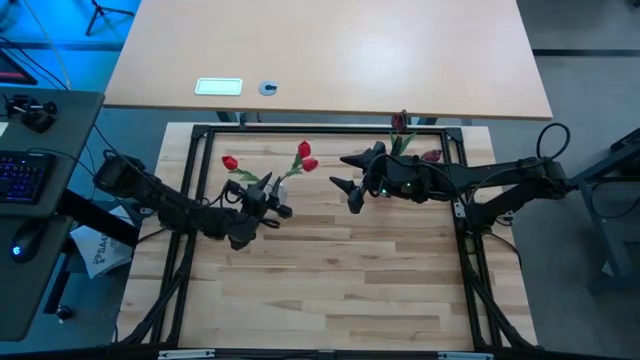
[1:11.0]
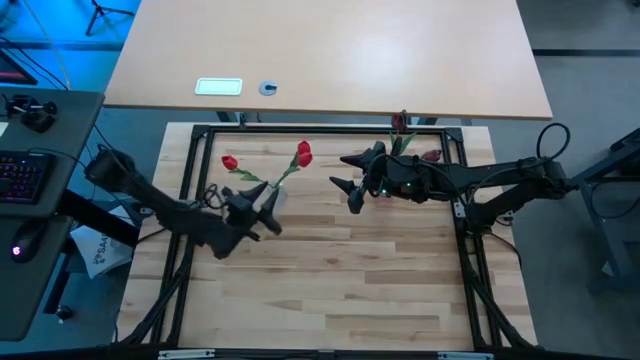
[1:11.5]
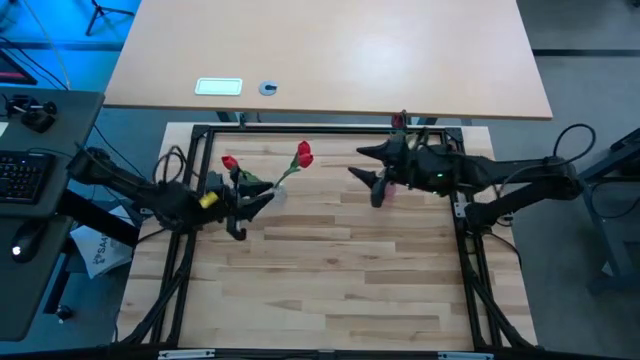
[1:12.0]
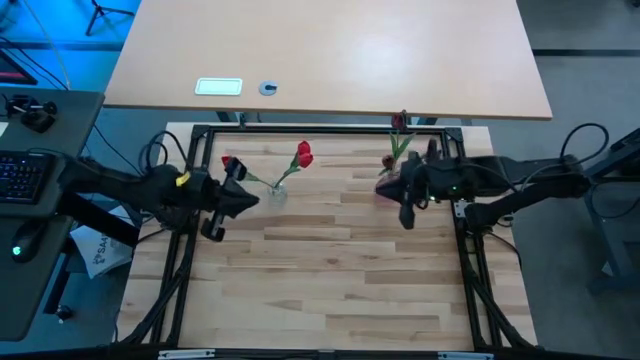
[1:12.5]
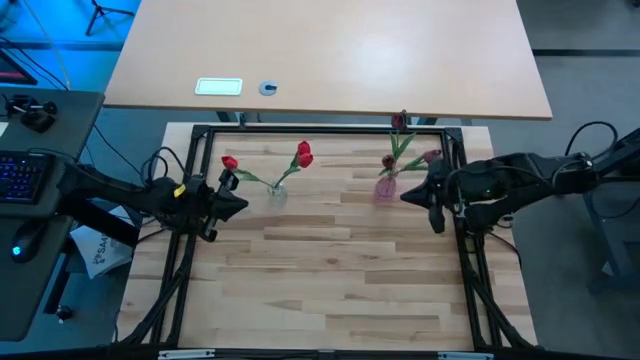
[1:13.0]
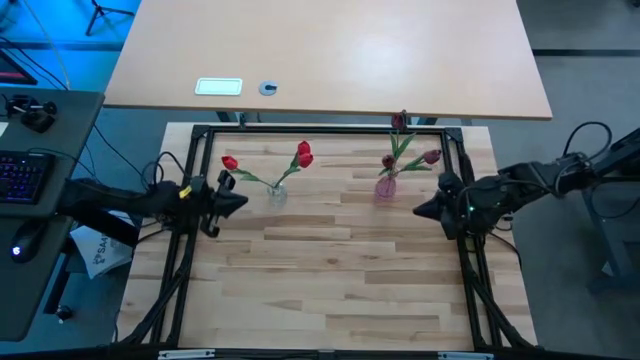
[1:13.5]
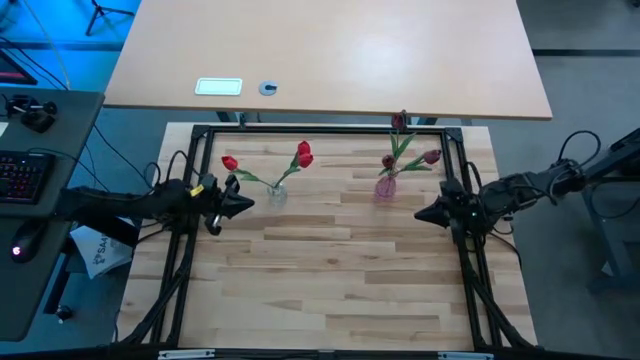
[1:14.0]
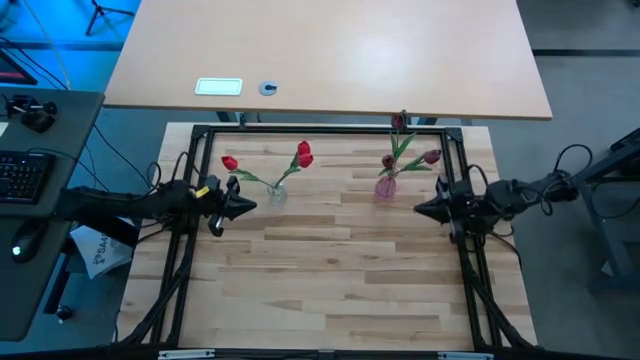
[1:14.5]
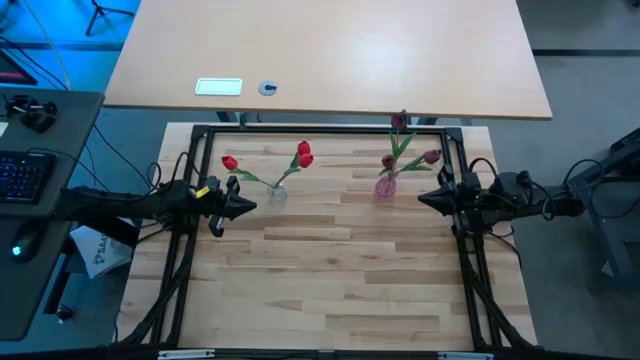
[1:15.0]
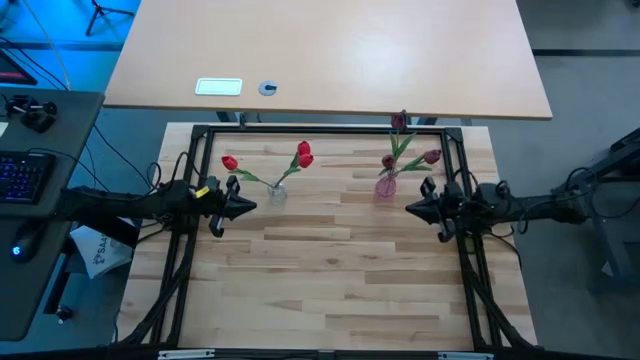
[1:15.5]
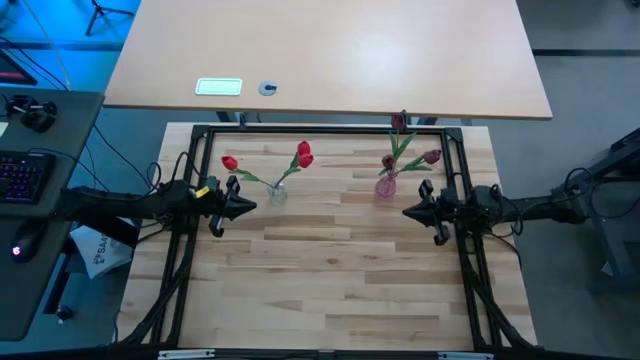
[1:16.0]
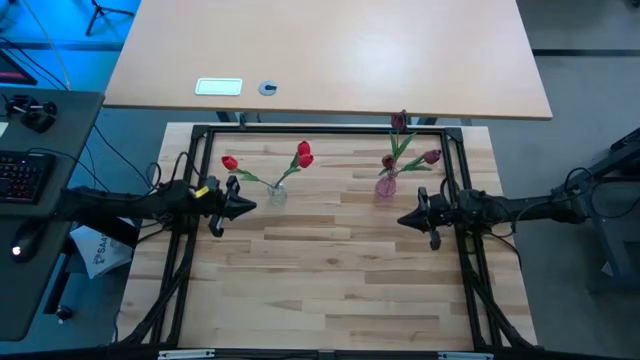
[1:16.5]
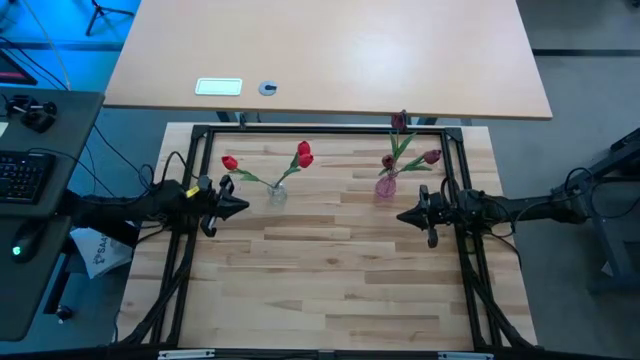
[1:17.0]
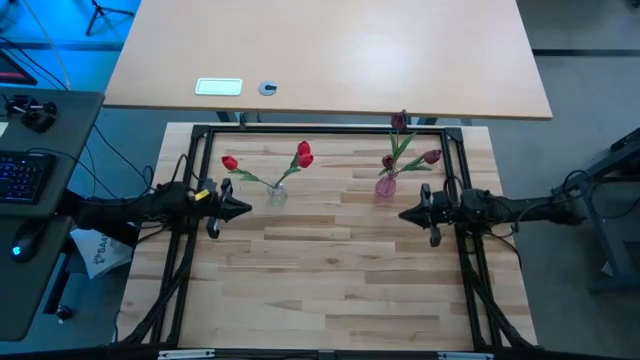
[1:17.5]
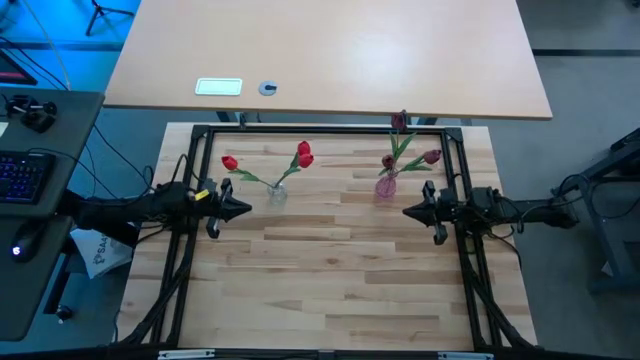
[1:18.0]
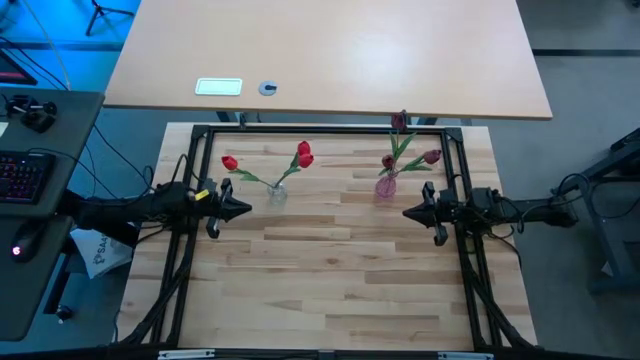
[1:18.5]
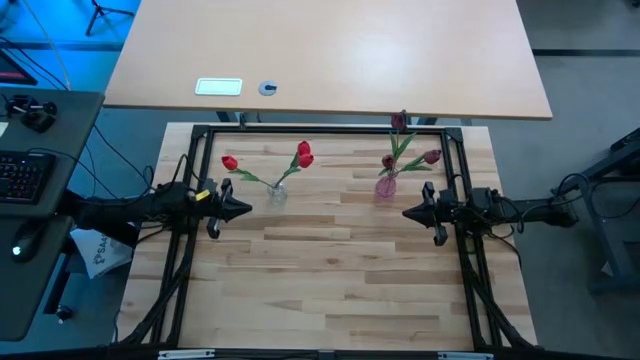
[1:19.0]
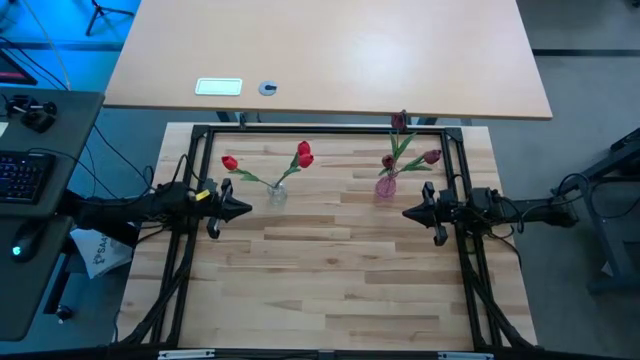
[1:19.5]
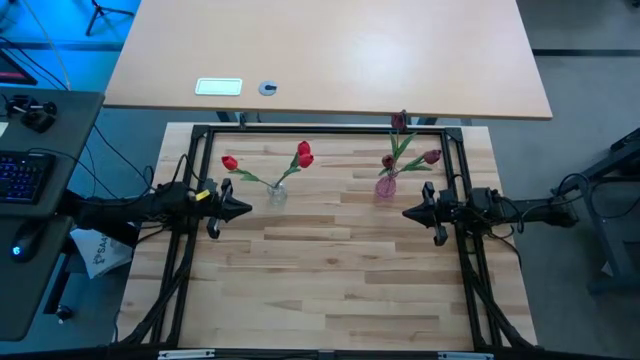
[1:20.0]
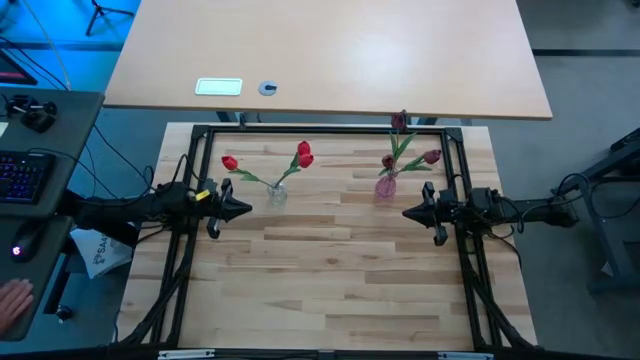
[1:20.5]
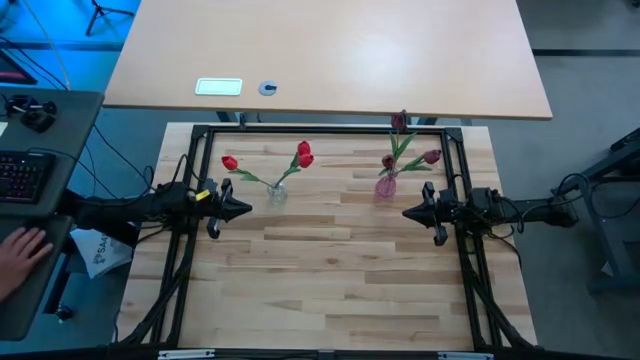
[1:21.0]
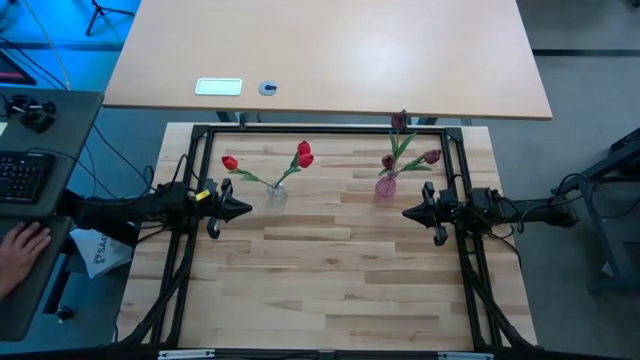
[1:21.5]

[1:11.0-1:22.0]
Task: Sort flowers into vase by color
Return to Home Position

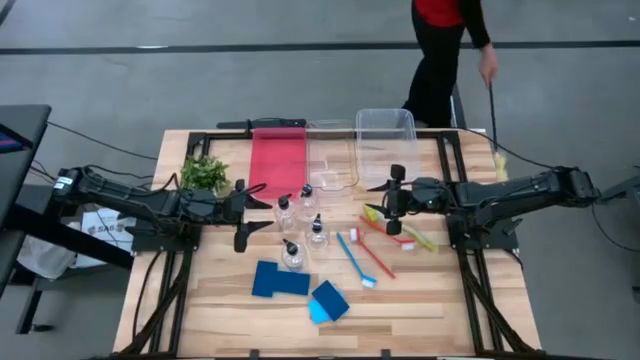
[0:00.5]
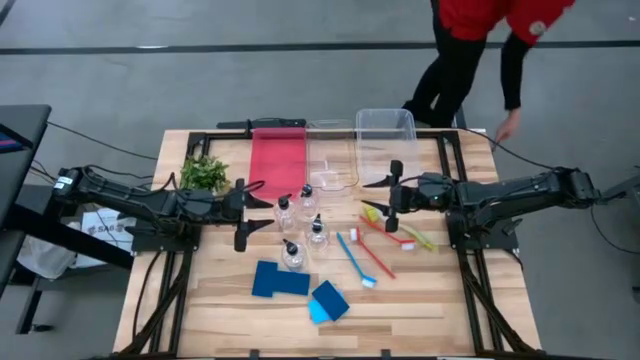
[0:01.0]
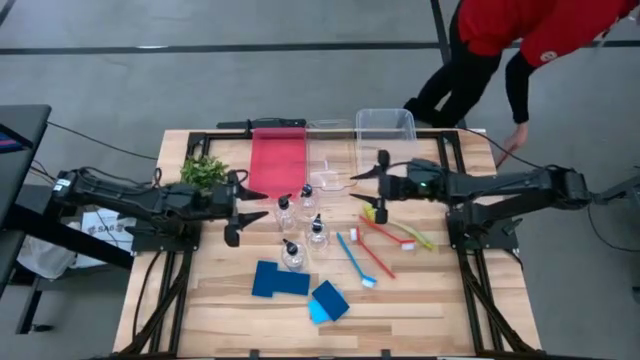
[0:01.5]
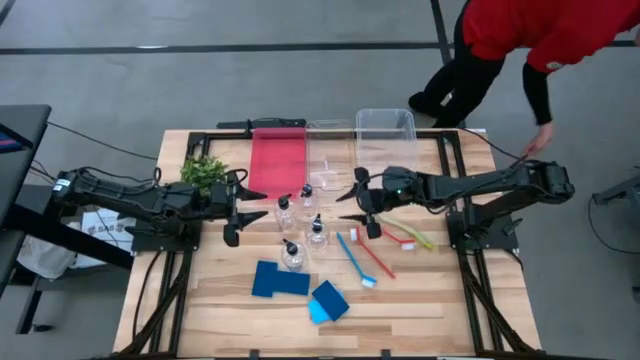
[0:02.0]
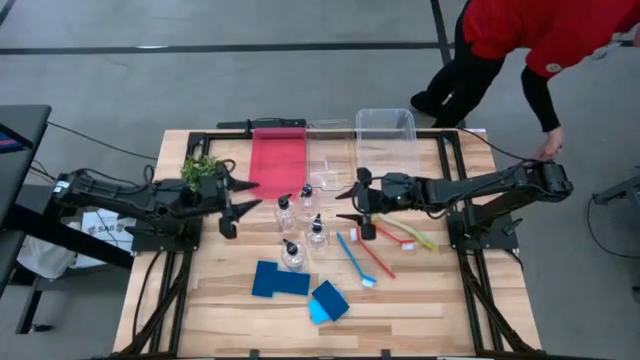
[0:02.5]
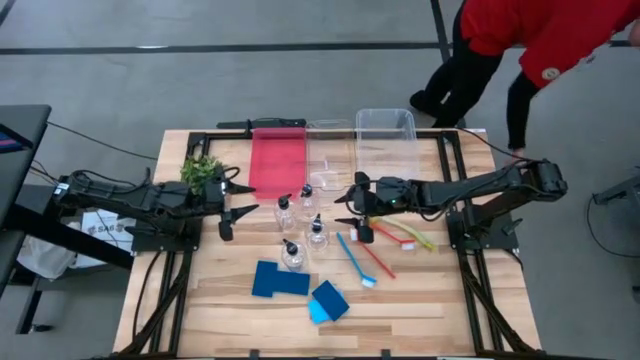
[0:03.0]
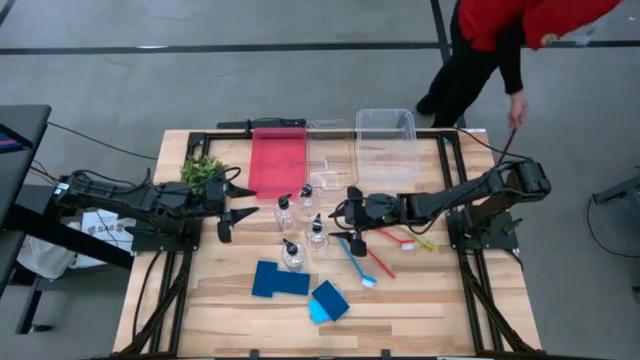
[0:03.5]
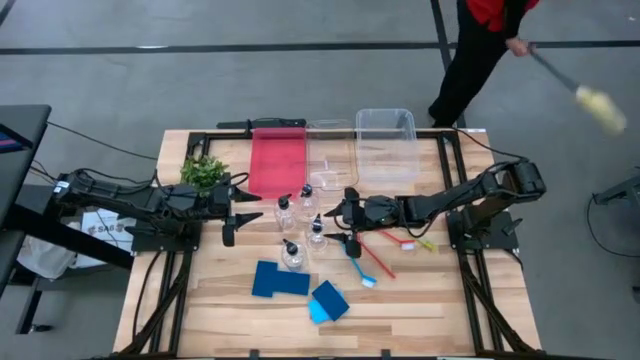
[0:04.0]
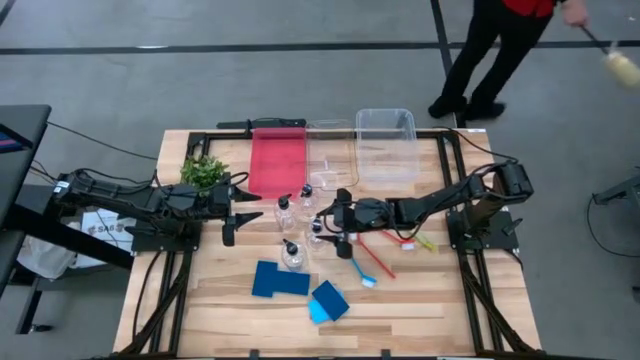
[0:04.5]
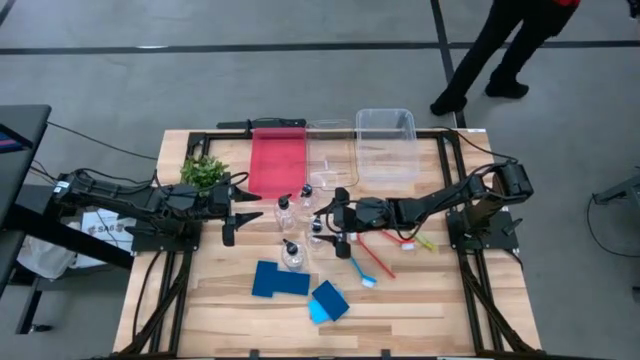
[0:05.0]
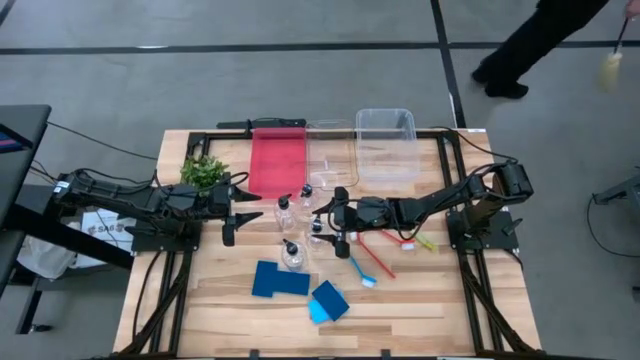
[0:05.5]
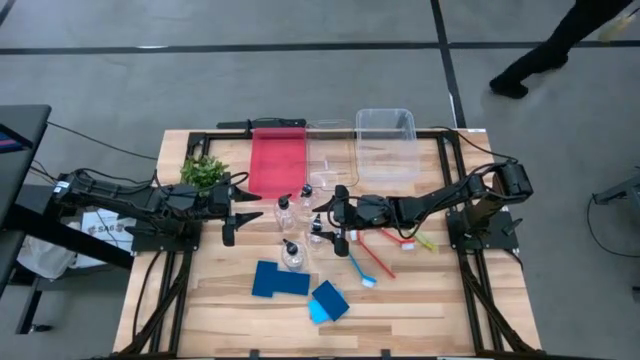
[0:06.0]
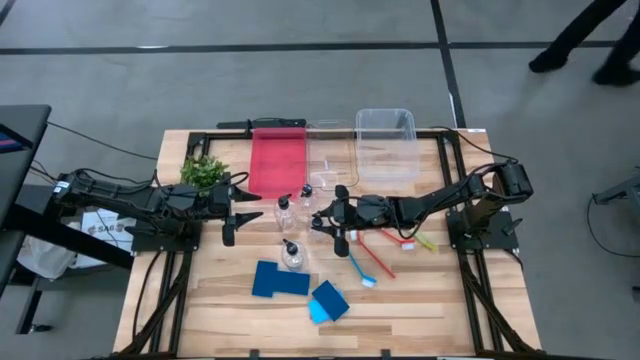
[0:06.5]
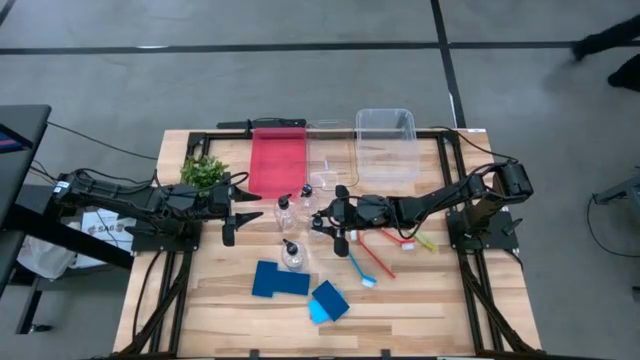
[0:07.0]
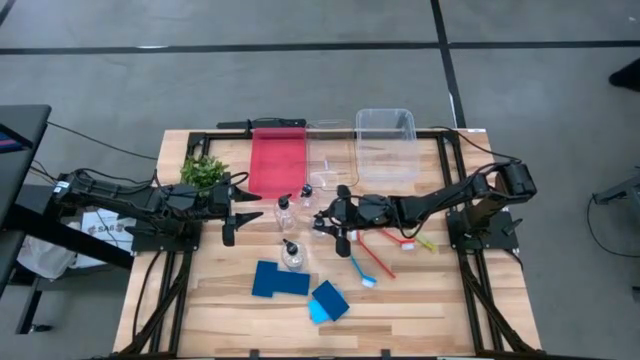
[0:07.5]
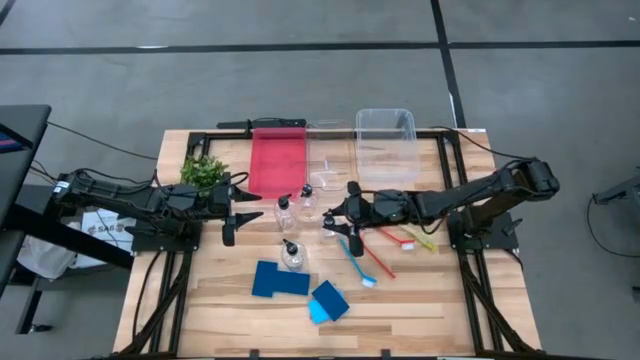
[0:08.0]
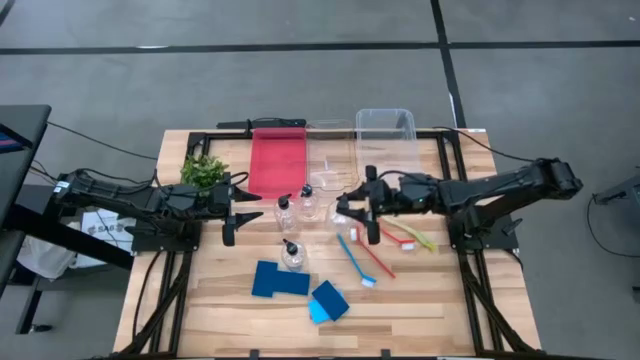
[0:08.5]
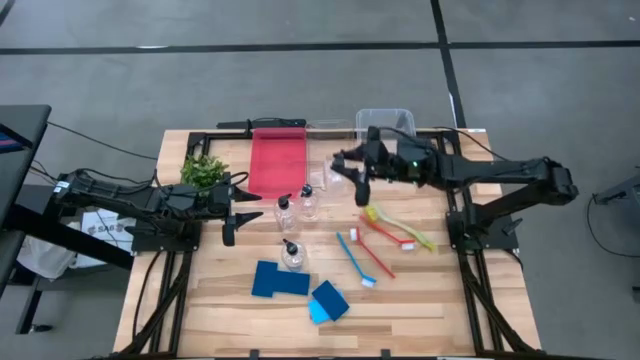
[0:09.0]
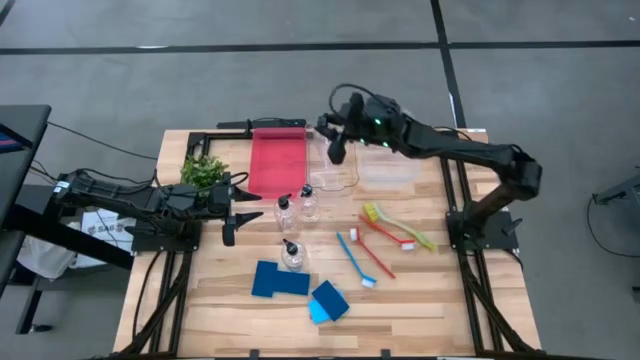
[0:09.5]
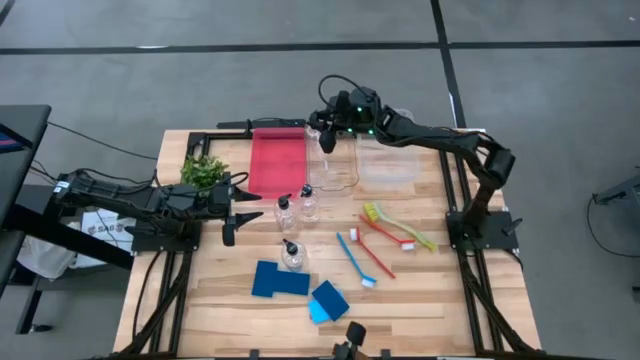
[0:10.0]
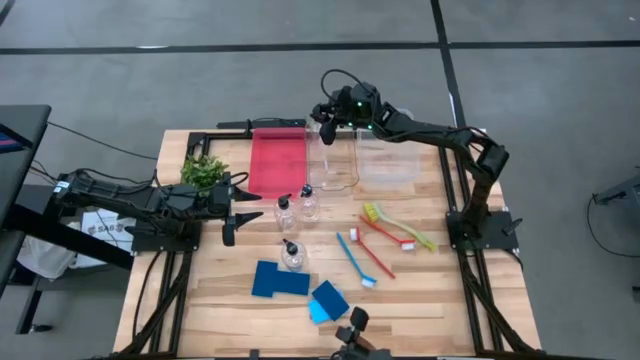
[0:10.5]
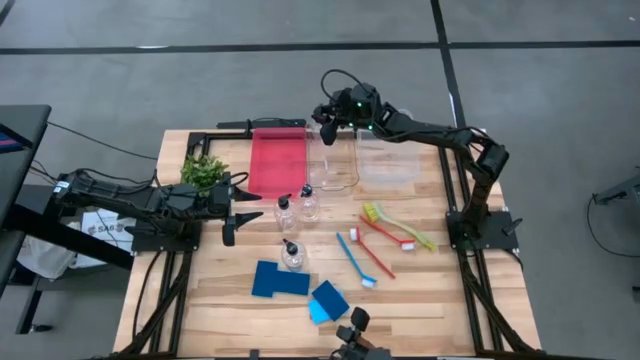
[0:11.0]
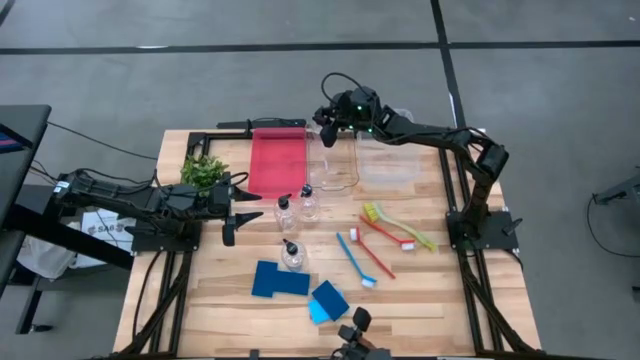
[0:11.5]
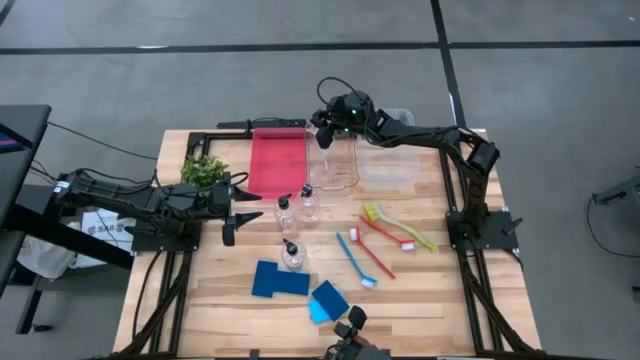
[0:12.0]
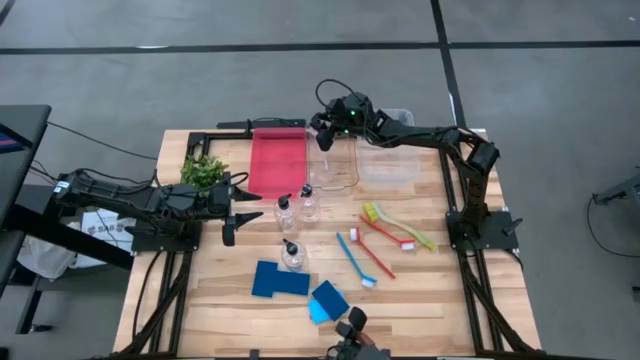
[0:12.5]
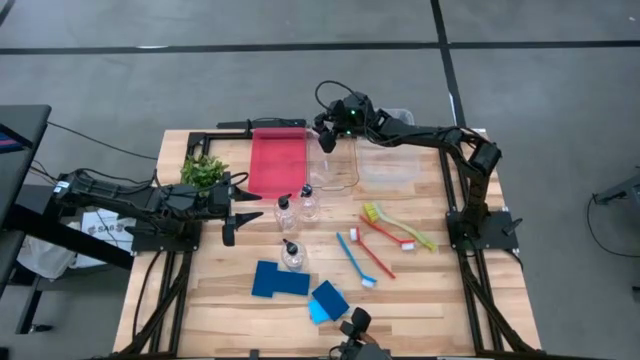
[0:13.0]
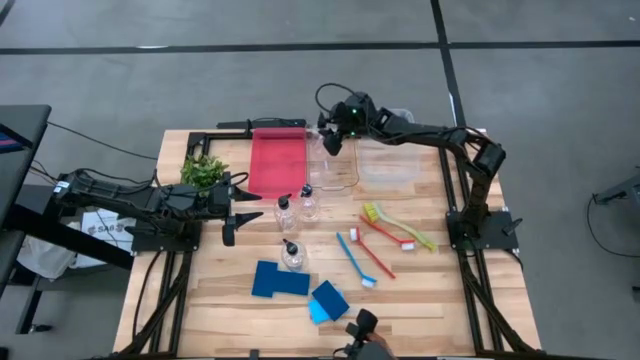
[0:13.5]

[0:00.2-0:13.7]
Task: Pick & Place Kitchen Sink Supplies
Put the soap dispenser into the left transparent bin
